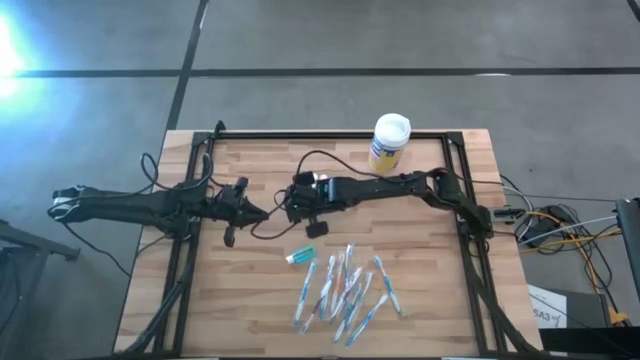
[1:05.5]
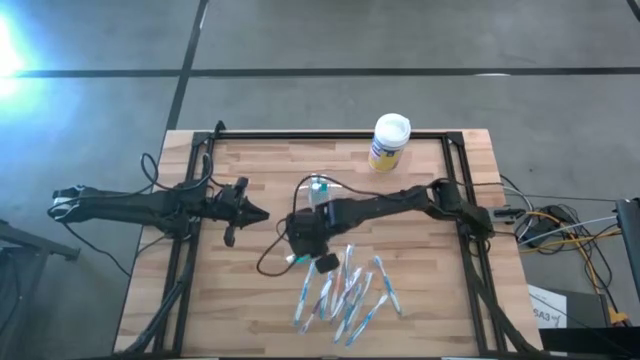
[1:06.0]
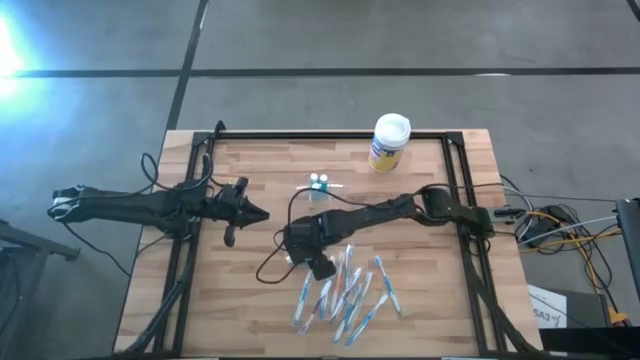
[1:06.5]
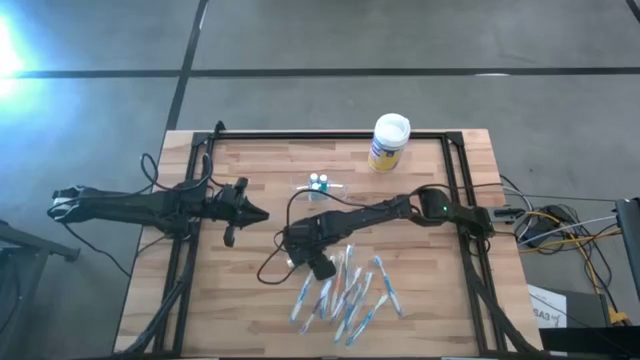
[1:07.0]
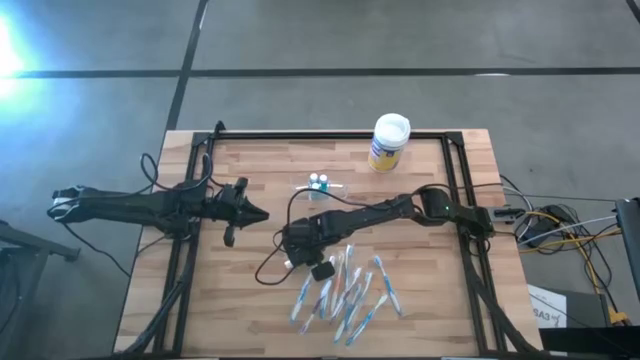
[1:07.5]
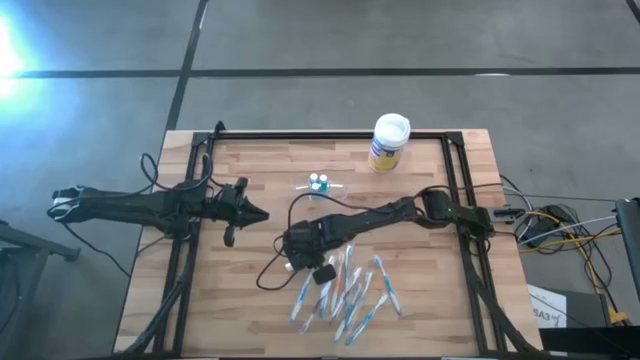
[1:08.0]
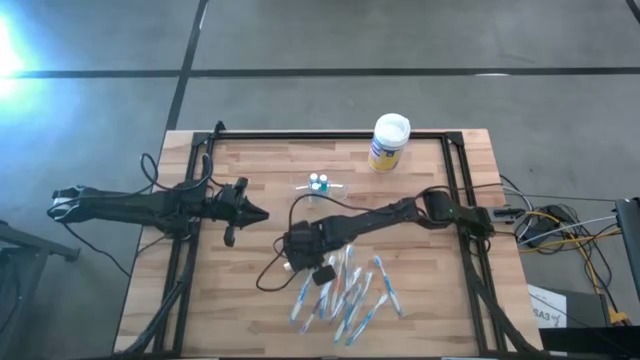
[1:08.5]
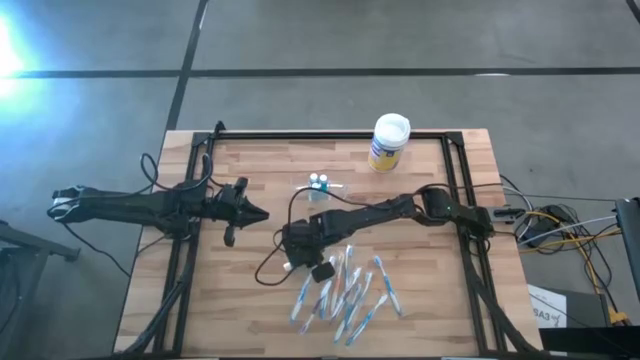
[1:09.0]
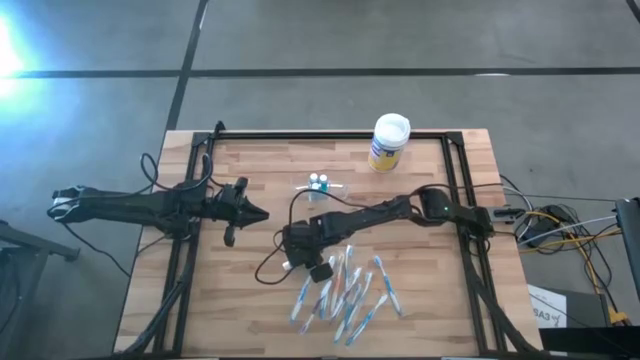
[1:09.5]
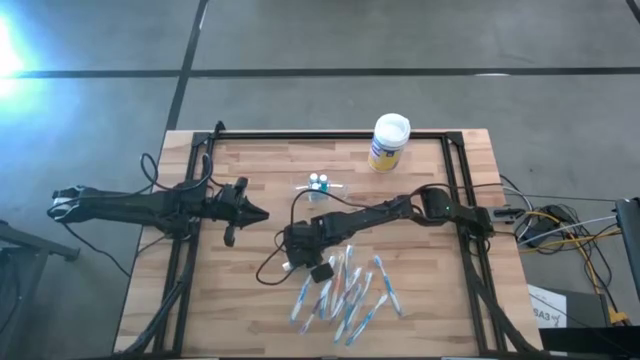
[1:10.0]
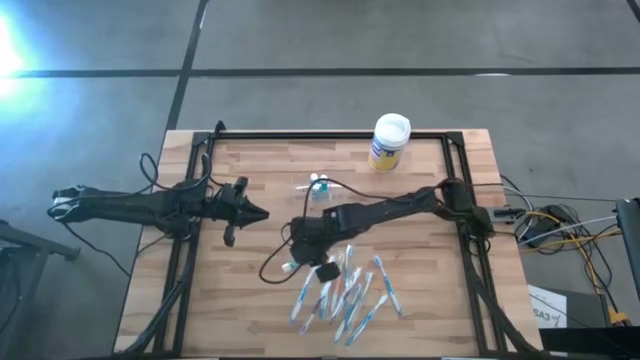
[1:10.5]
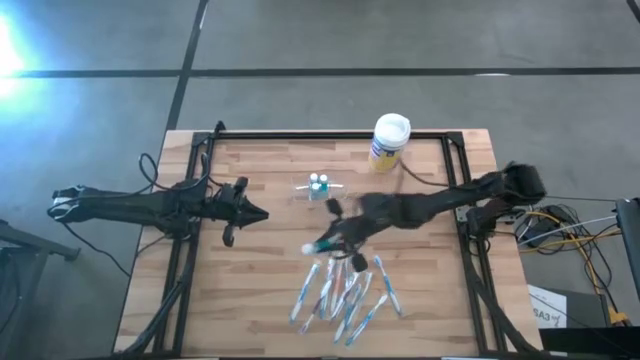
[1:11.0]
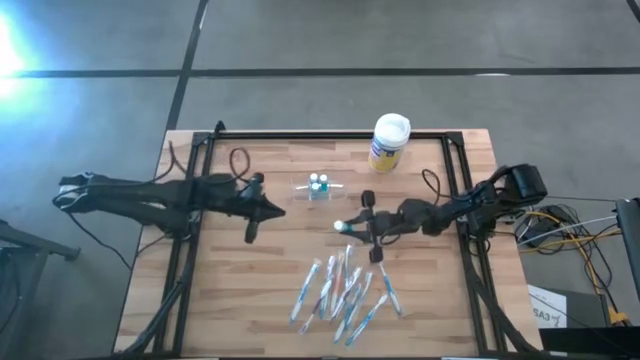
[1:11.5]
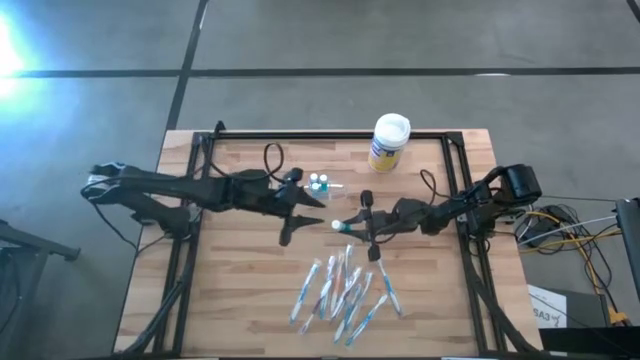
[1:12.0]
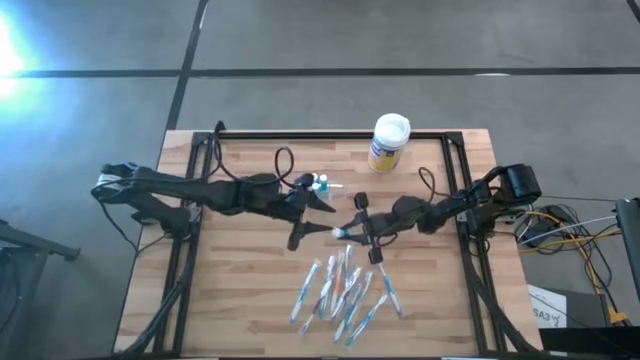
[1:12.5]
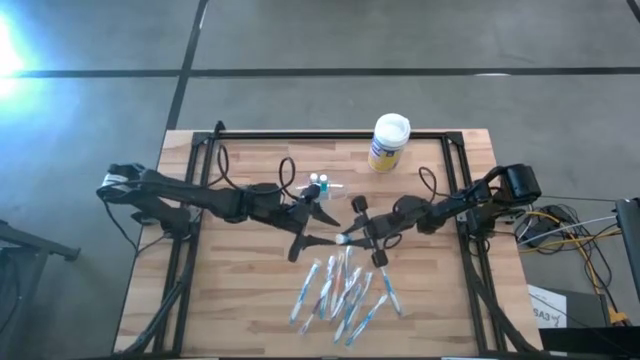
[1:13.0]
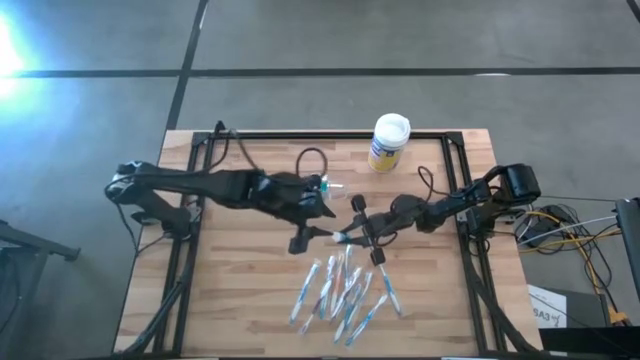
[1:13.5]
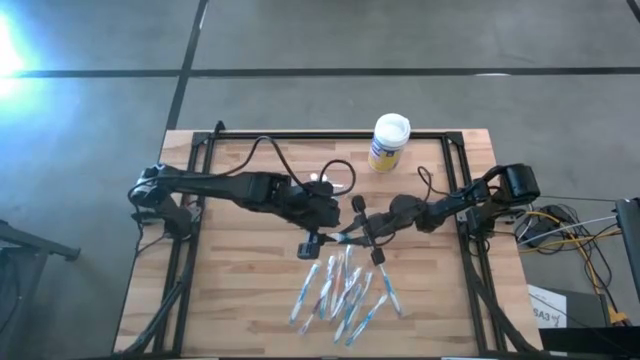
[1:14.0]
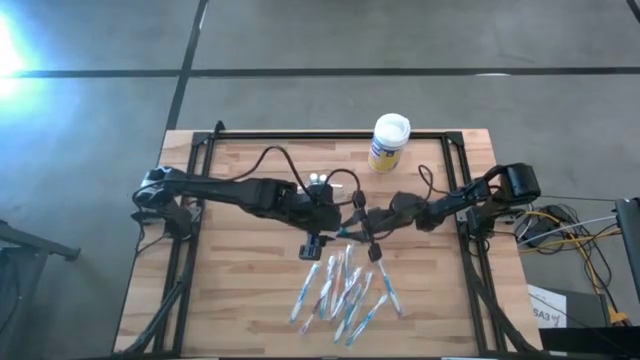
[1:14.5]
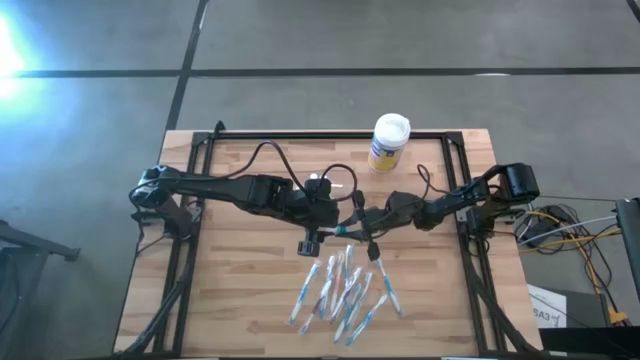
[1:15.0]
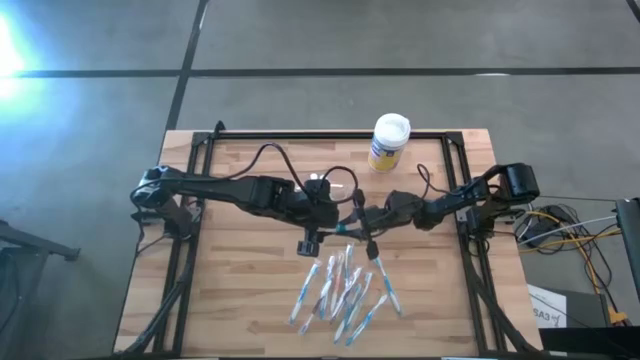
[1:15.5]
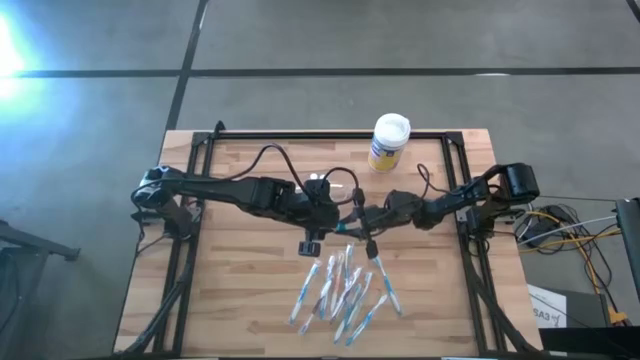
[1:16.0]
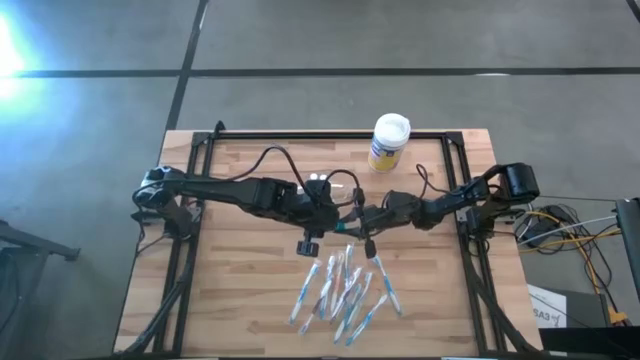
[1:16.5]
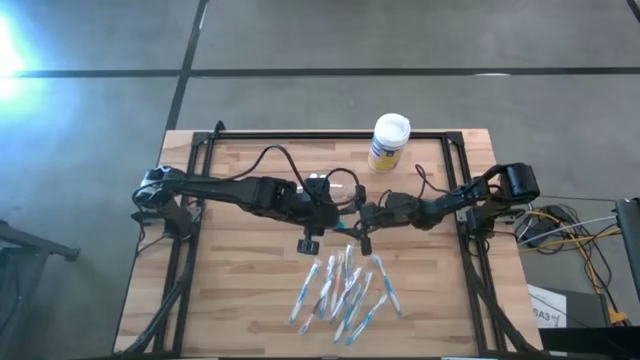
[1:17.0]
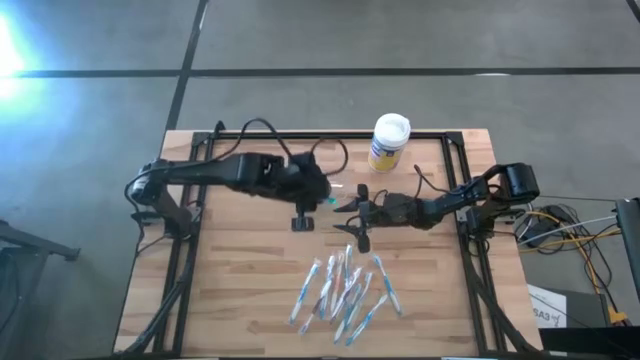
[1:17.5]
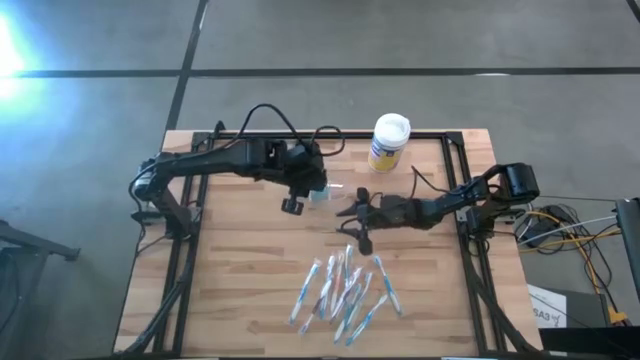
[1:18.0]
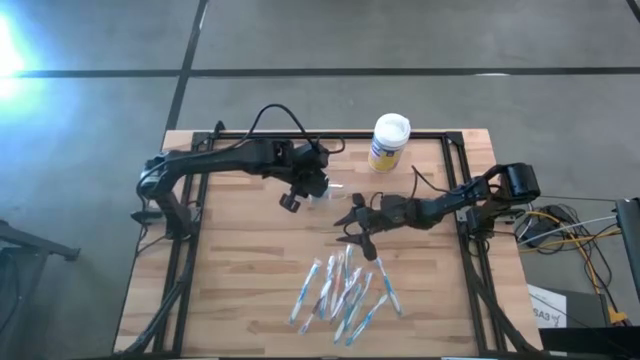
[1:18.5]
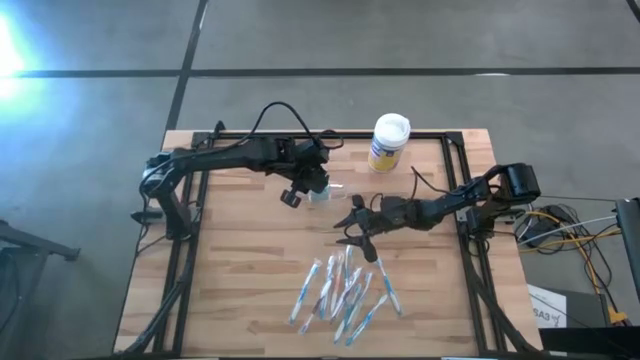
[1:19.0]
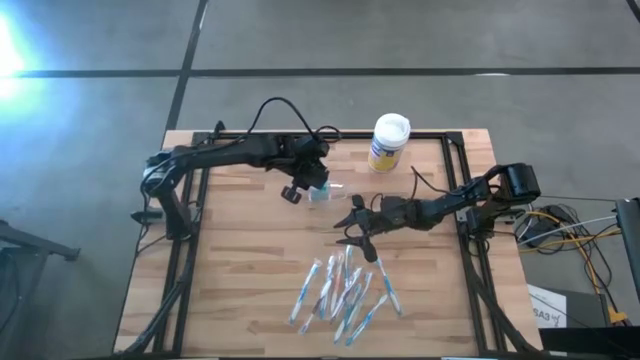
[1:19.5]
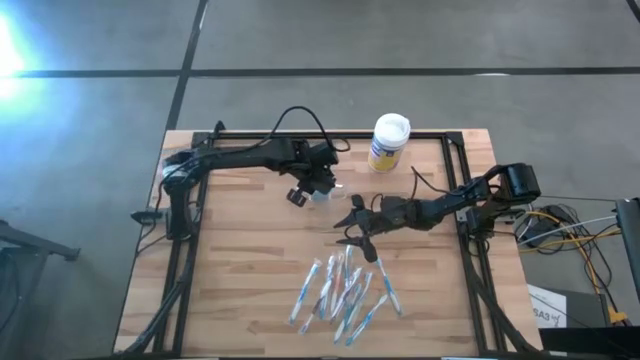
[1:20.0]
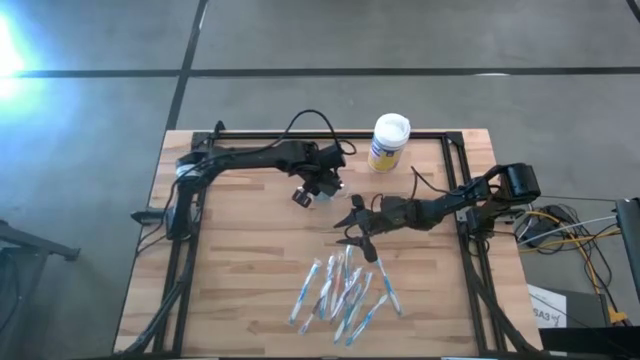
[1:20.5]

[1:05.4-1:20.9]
Task: Pick & Place toothbrushing station
Put the blue mouthwash into the transparent organizer

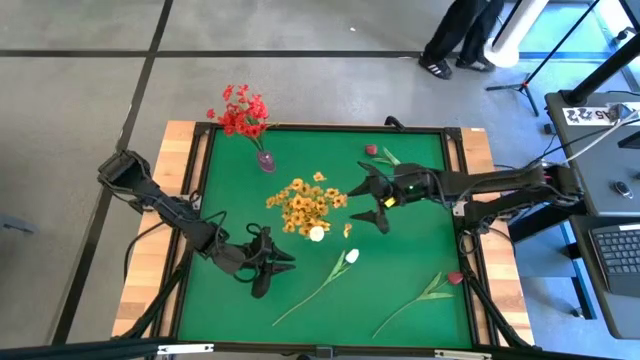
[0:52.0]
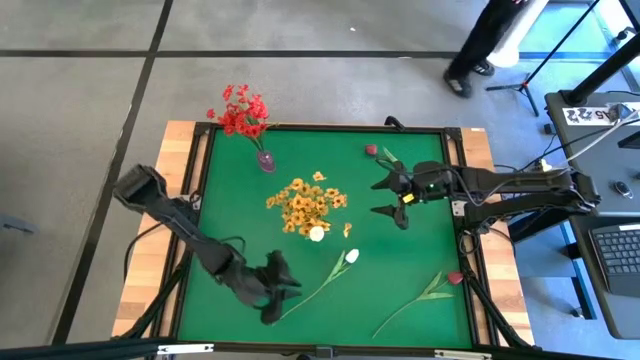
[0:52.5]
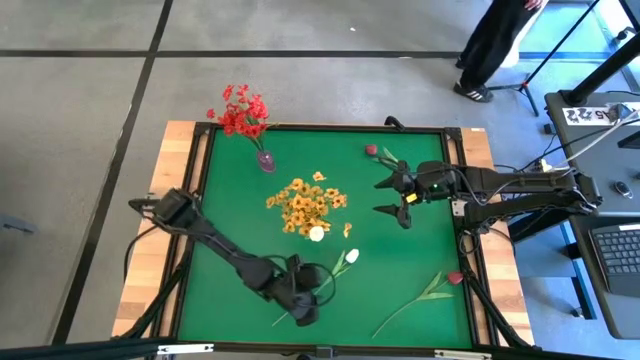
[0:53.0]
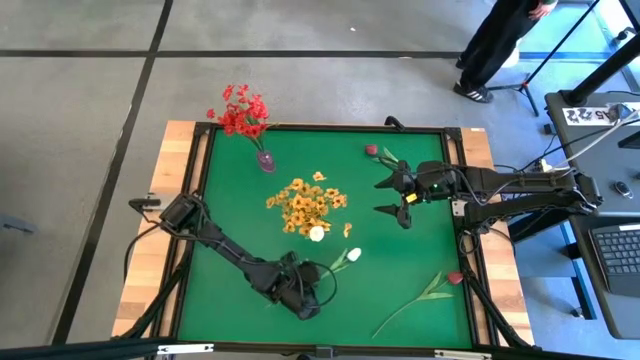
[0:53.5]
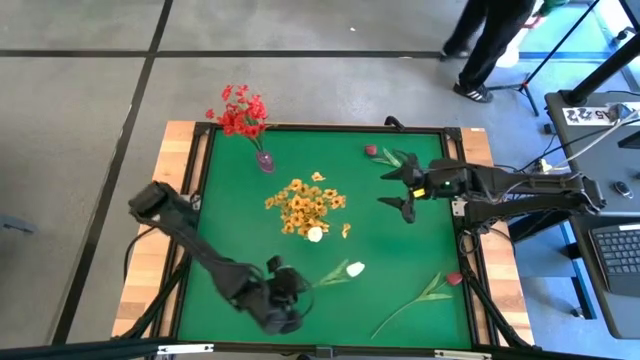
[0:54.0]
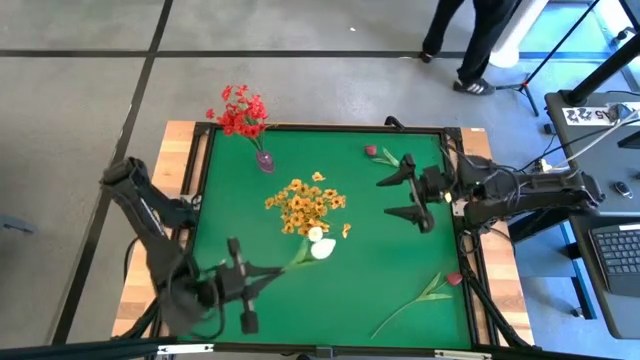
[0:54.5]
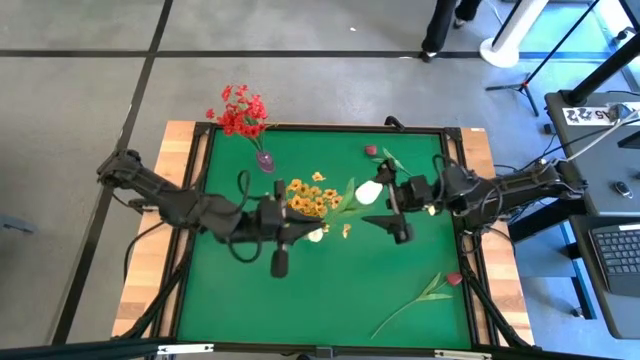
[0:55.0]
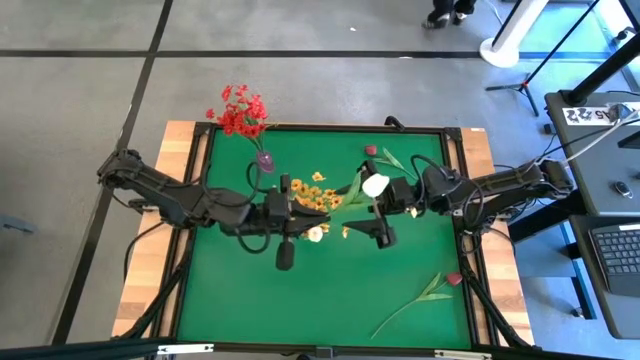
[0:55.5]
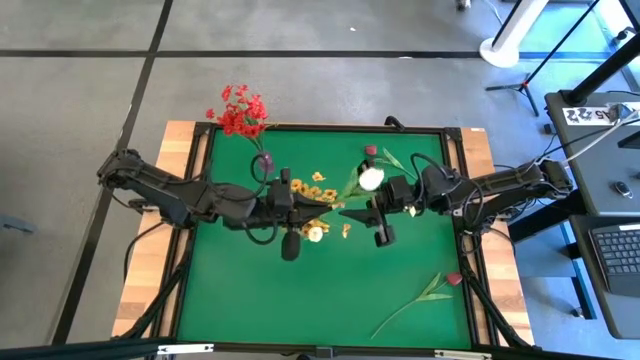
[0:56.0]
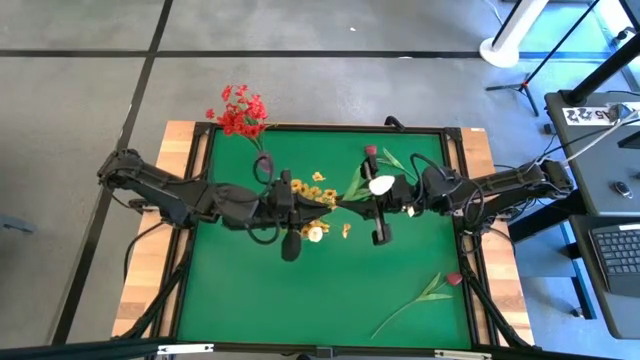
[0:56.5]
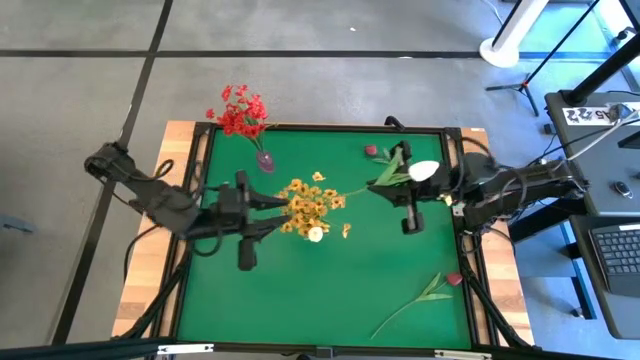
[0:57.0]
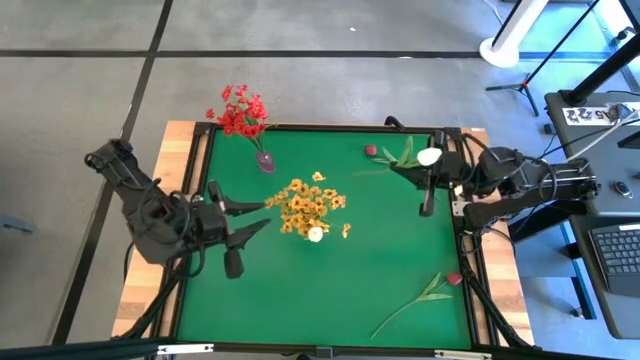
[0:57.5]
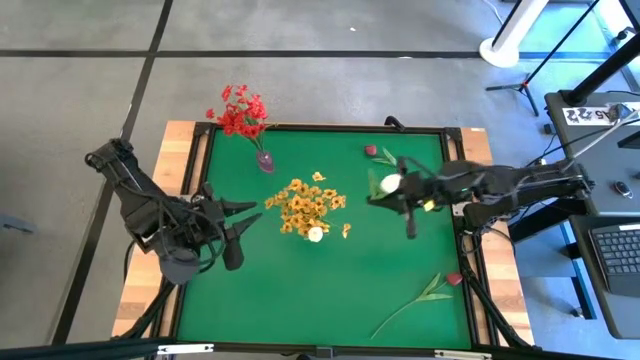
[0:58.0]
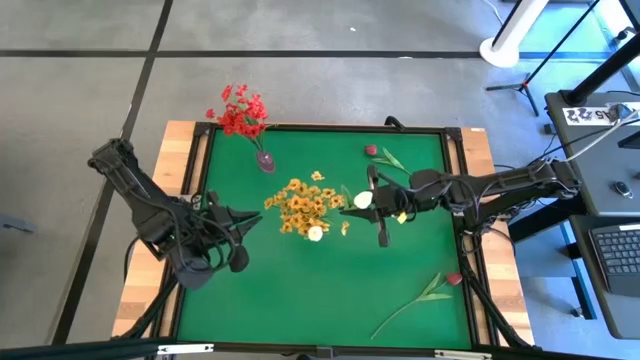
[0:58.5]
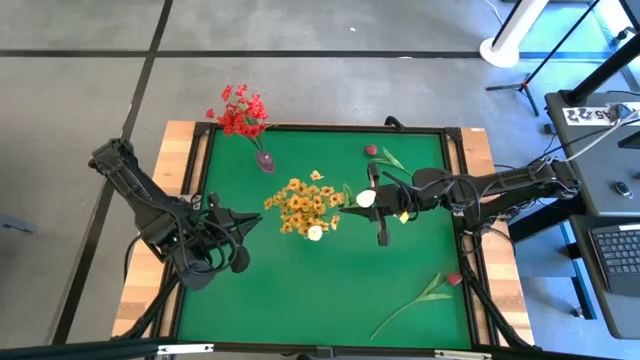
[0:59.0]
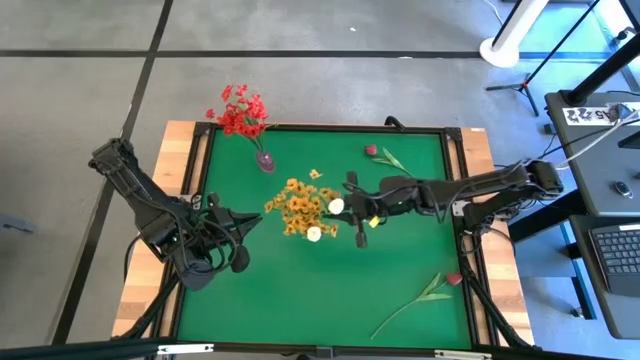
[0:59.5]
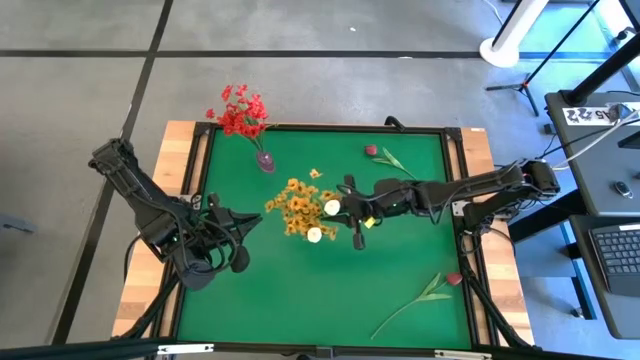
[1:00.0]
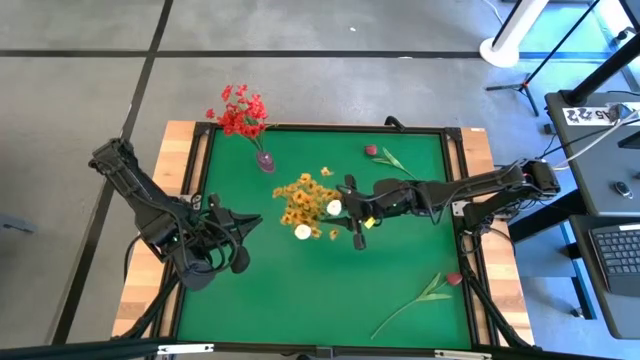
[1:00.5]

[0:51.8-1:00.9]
Task: Sort flowers into vase by color
Put the white tulip into the transparent vase
